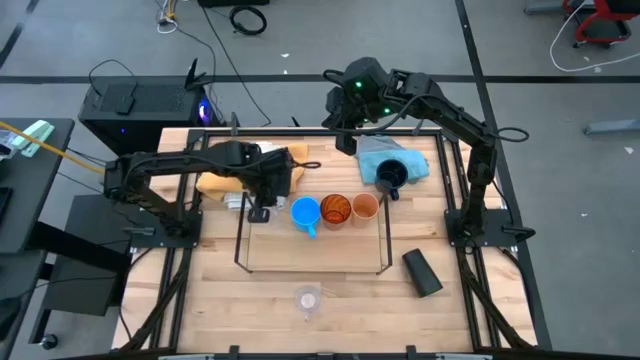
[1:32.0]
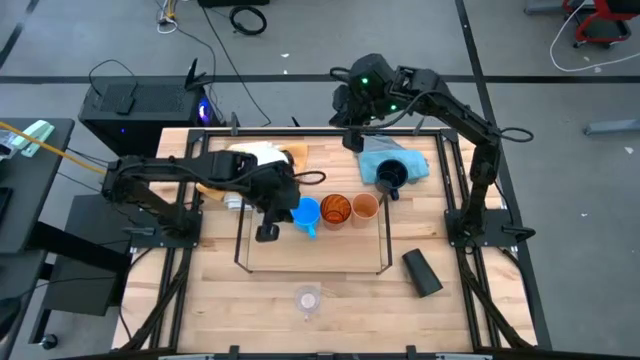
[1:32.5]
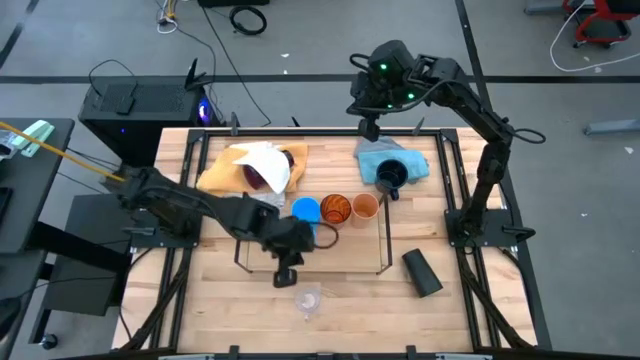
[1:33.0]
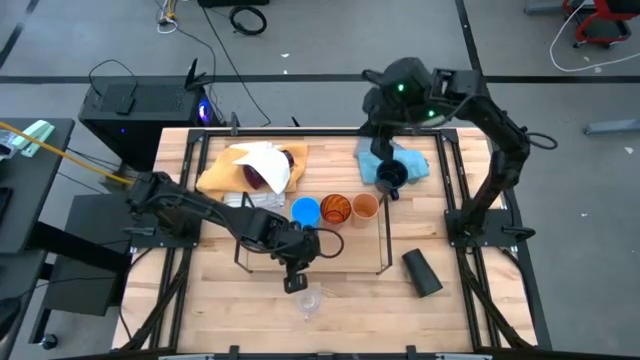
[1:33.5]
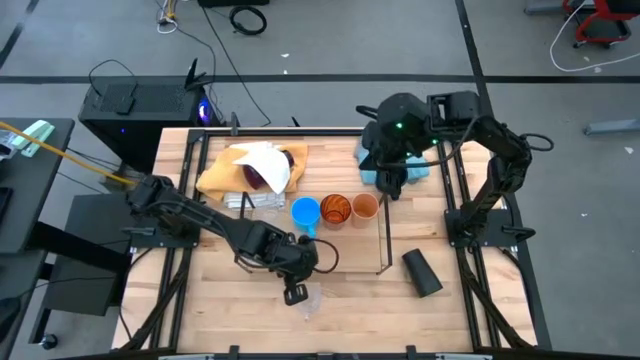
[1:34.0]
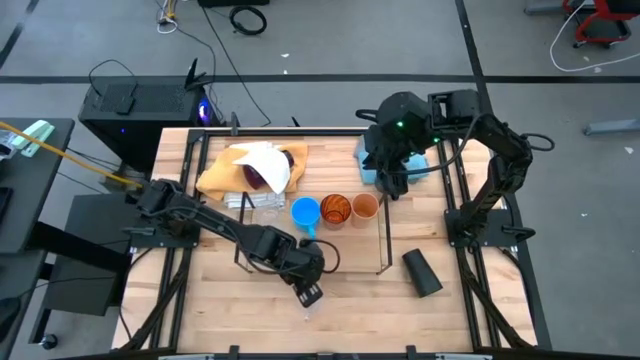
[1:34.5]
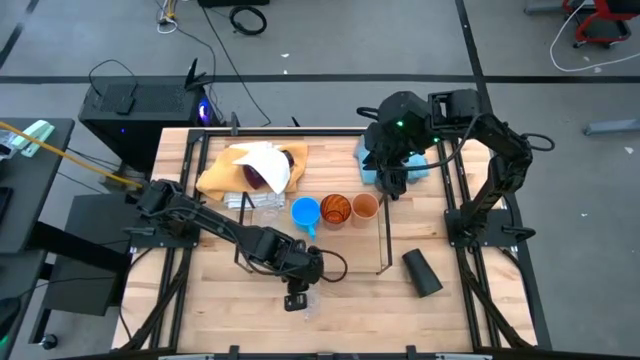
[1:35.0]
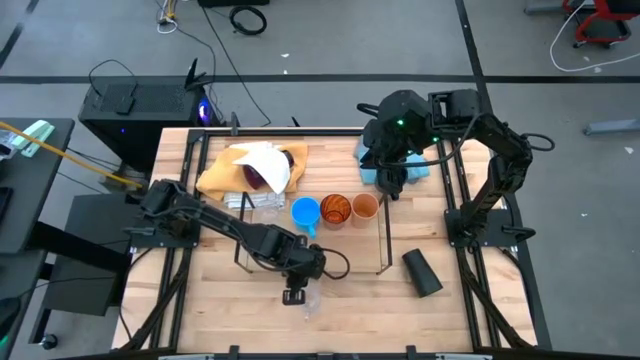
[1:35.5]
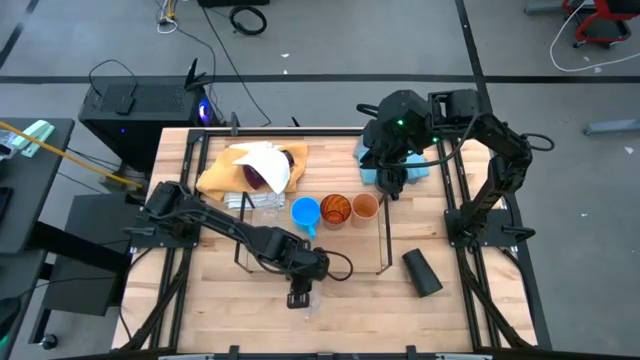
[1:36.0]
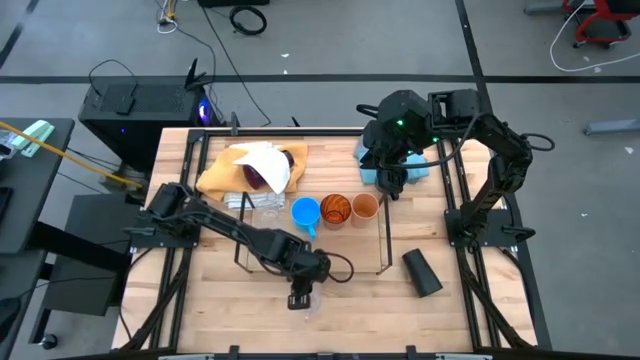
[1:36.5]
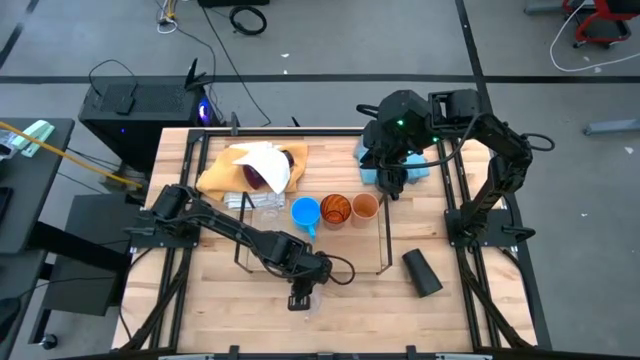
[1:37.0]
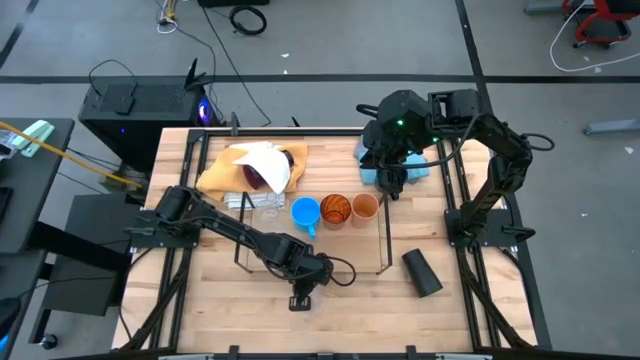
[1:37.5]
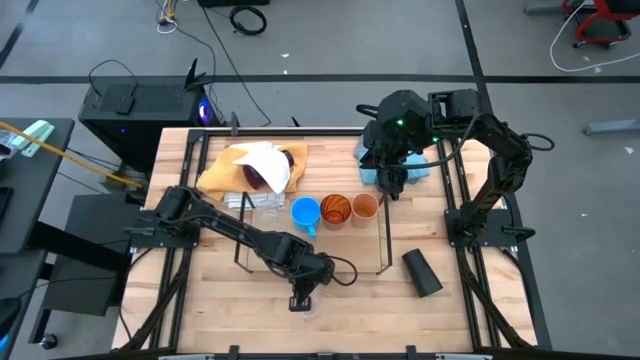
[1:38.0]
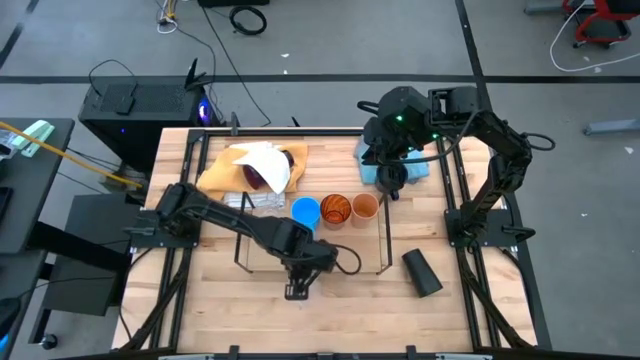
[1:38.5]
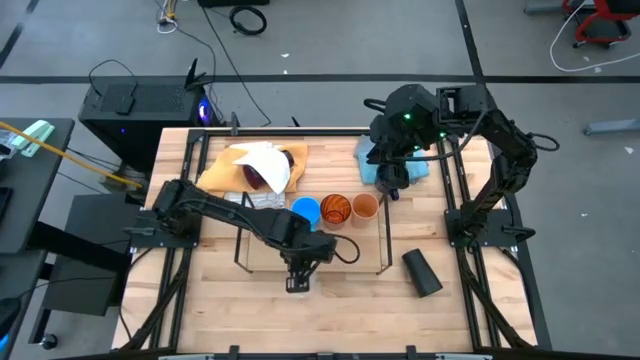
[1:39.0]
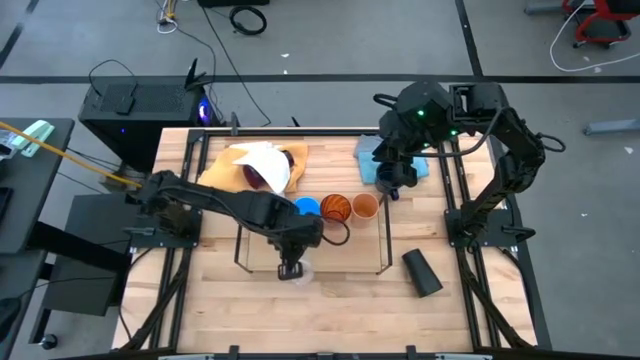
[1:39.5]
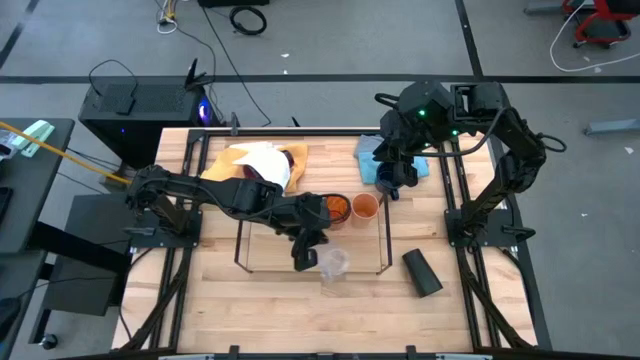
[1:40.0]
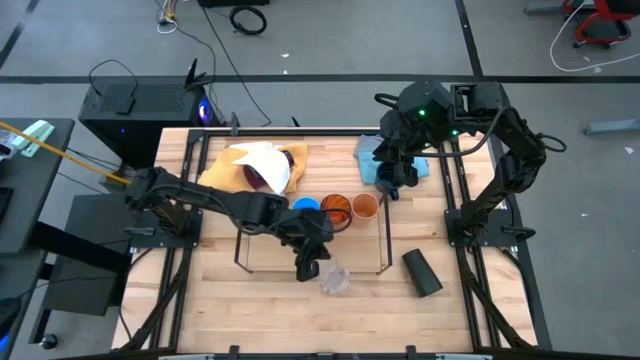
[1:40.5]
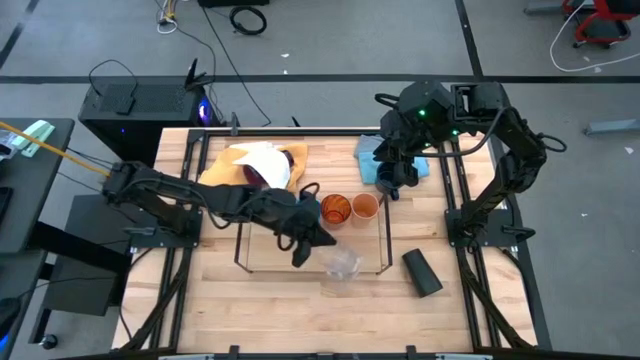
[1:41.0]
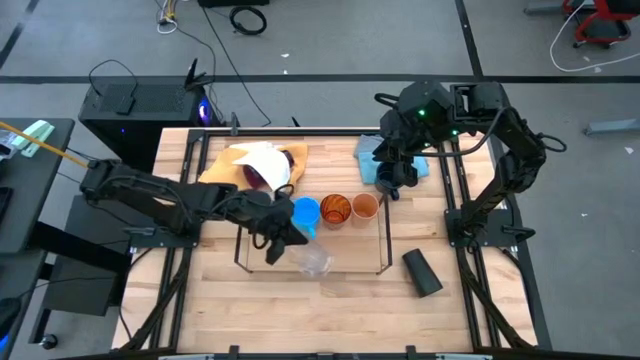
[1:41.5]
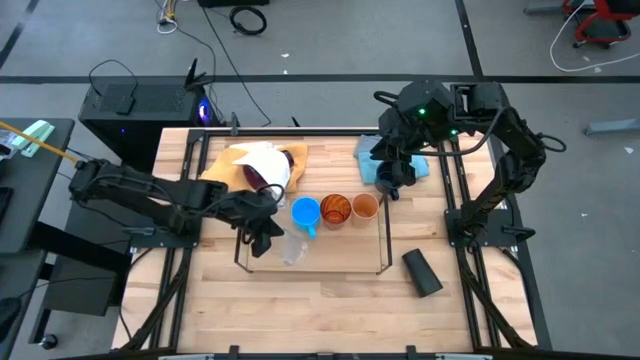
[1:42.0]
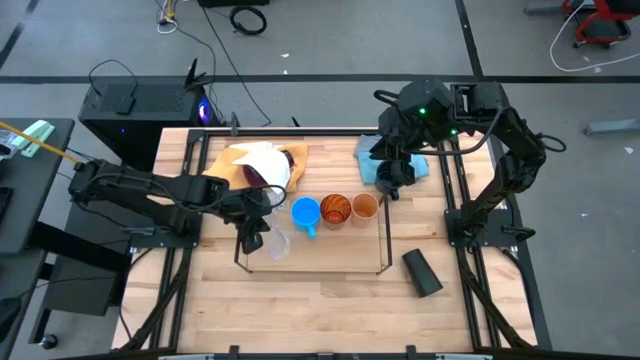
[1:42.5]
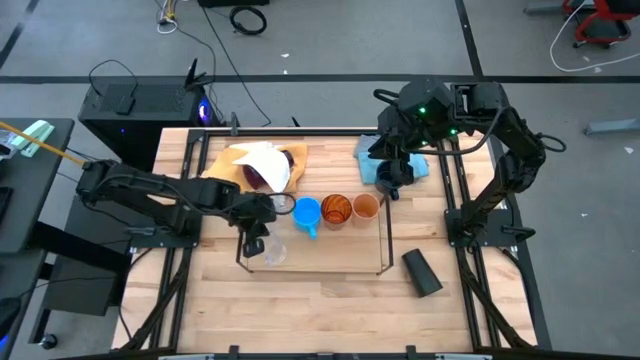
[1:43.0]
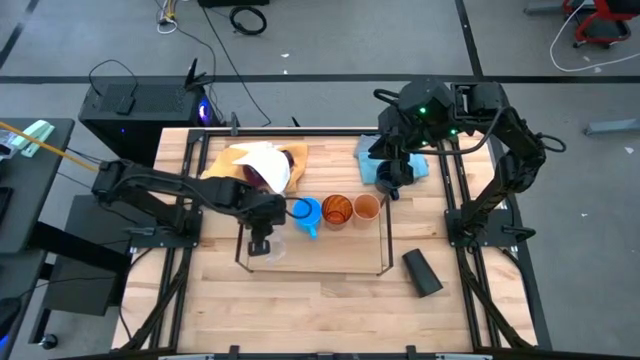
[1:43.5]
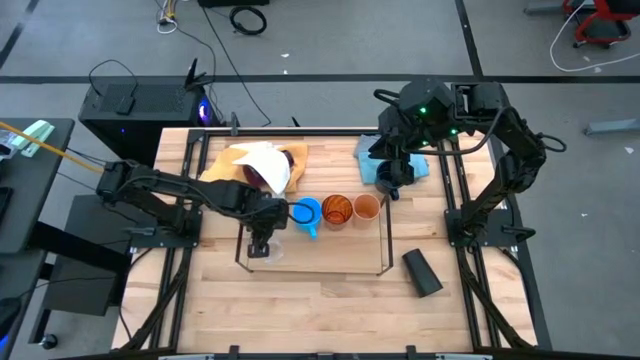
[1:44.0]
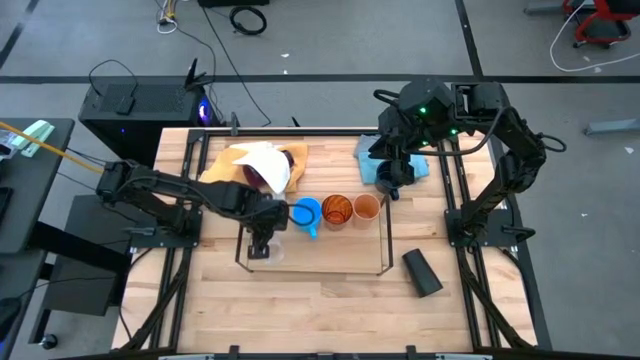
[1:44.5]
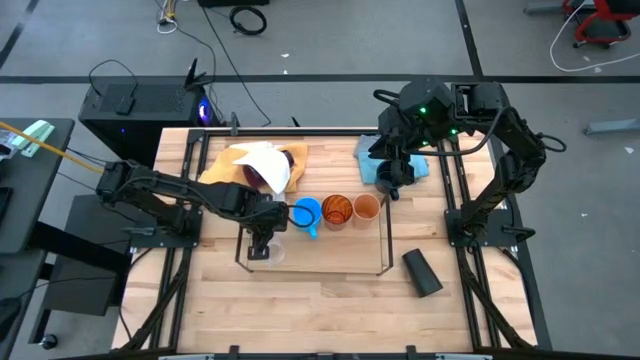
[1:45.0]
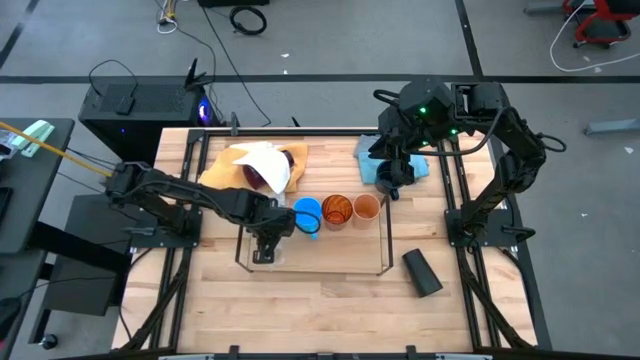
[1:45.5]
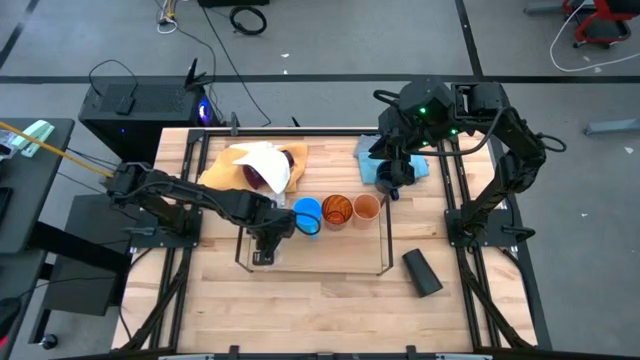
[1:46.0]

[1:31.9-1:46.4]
Task: Stack small to large cups/mugs on shelf
Put the transparent mug on the shelf

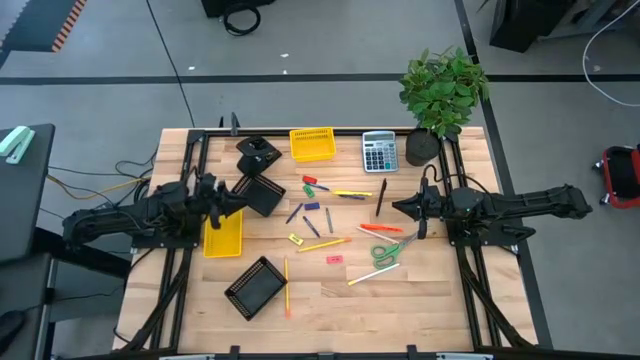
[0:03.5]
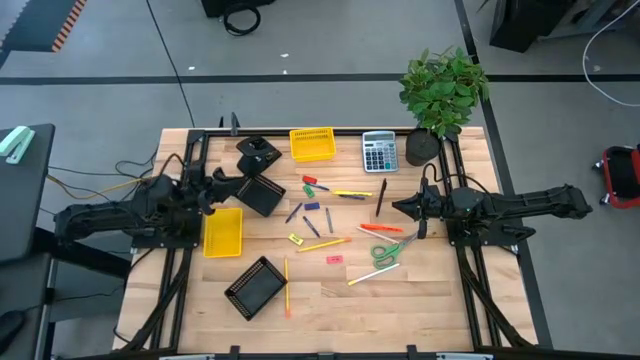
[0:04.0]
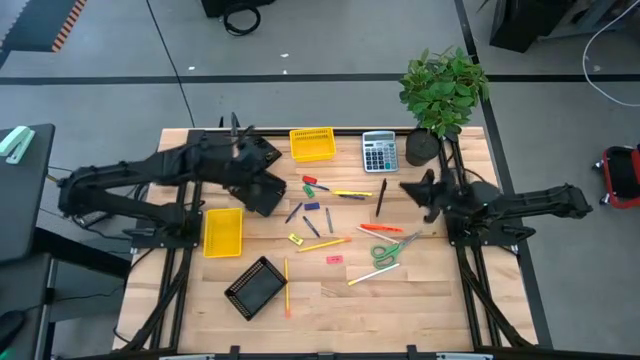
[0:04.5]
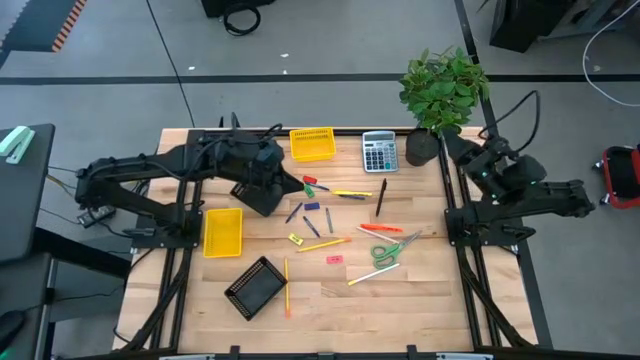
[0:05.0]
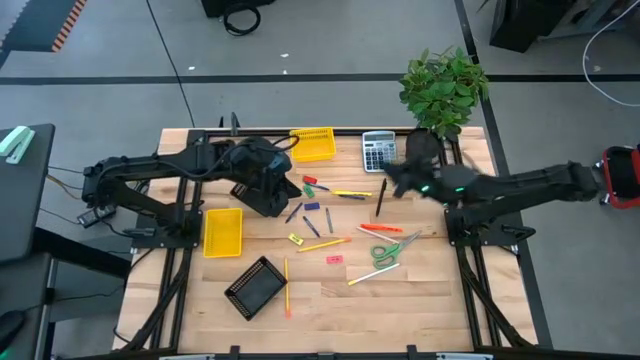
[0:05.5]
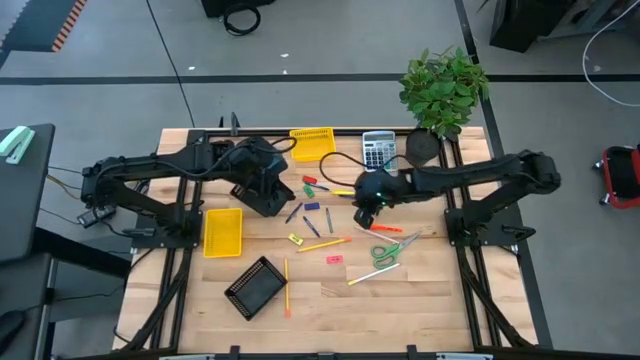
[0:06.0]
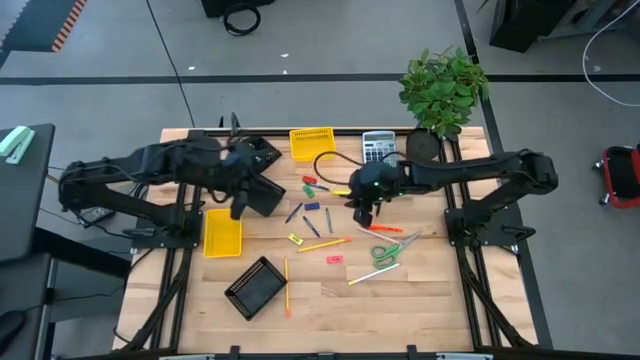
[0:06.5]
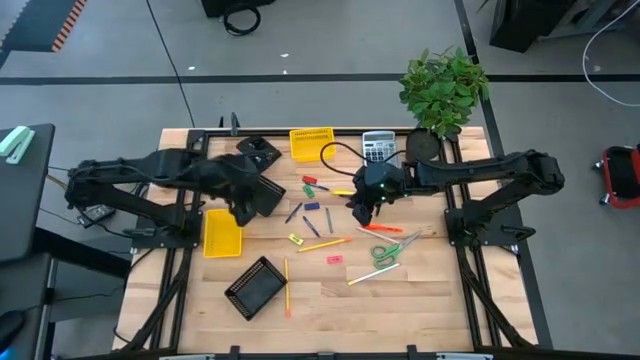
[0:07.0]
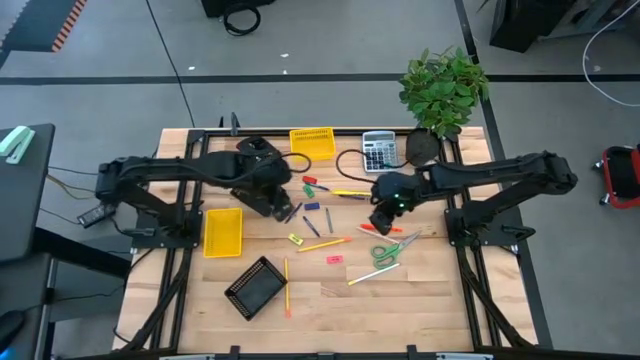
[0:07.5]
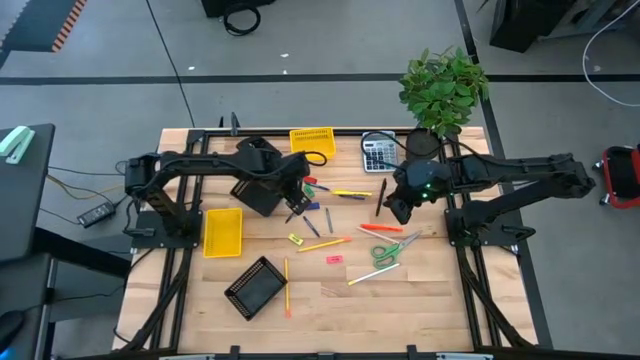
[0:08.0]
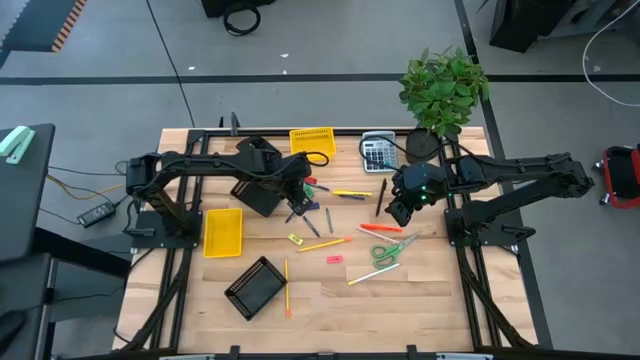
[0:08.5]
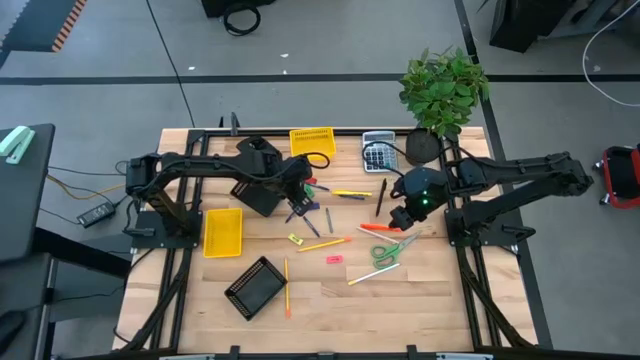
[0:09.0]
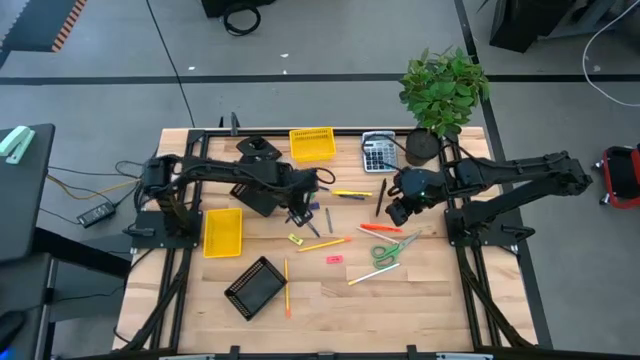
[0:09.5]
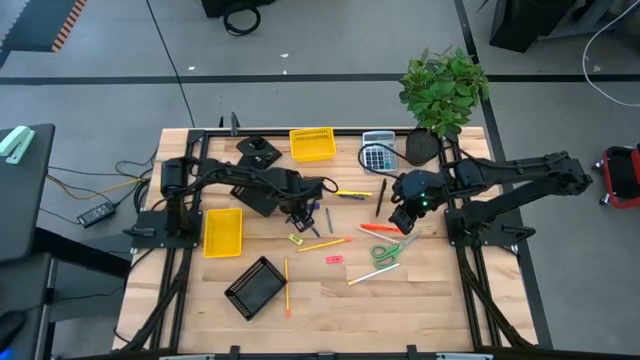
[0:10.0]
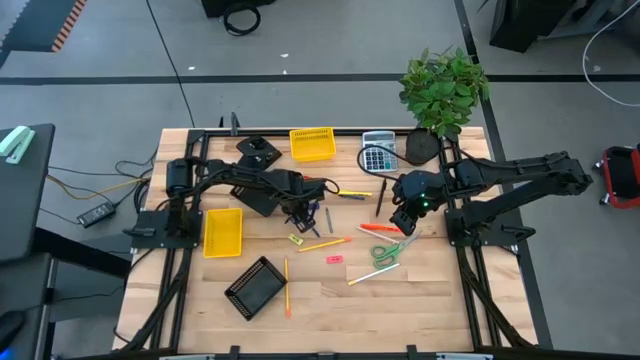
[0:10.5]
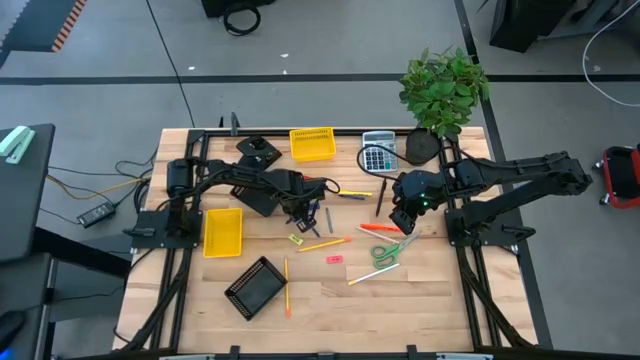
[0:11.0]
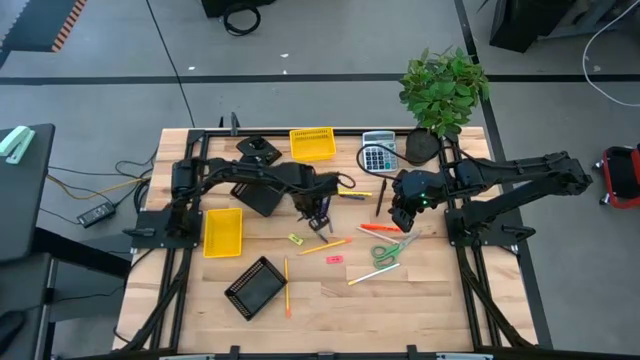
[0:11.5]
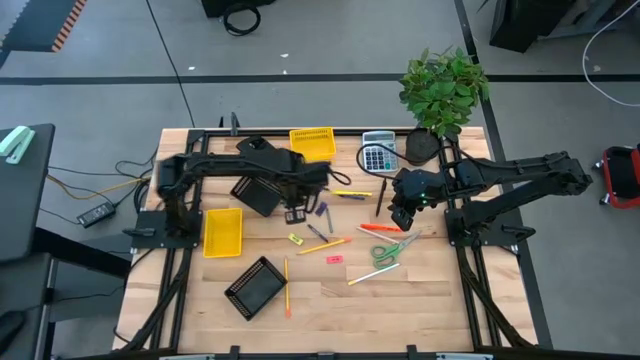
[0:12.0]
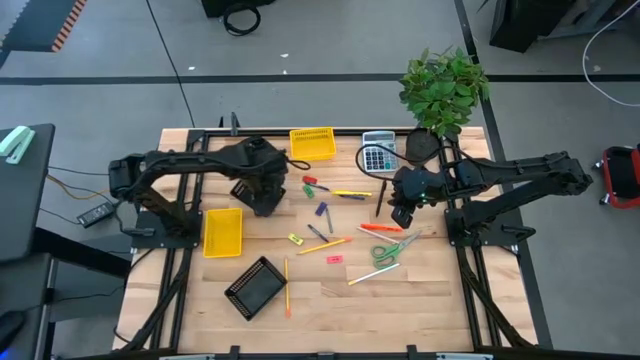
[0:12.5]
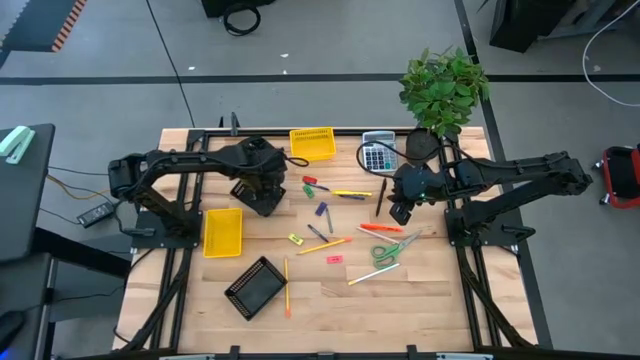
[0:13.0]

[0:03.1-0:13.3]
Task: Sort crayons/erasers/pens/pencils in bins
Put the blue crayon into the top black basket
